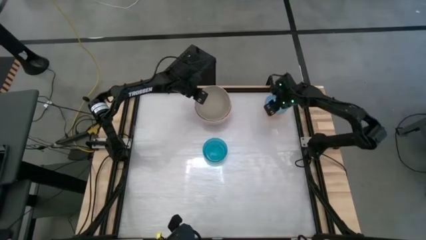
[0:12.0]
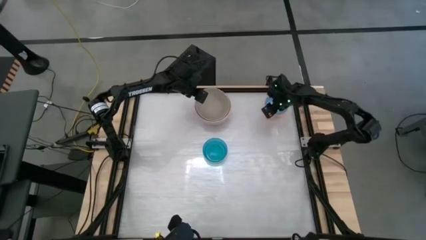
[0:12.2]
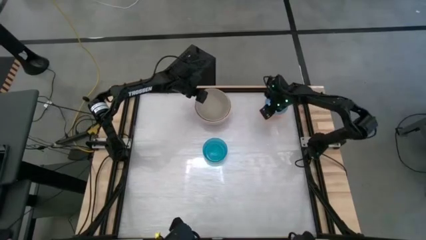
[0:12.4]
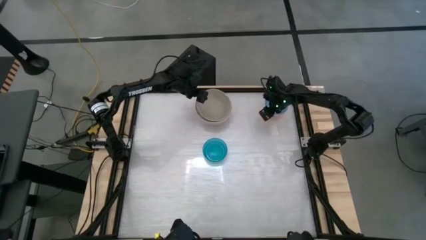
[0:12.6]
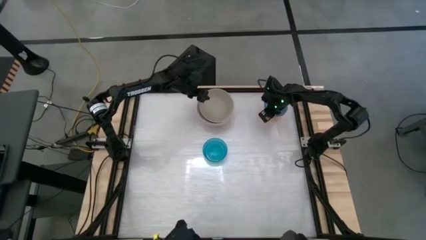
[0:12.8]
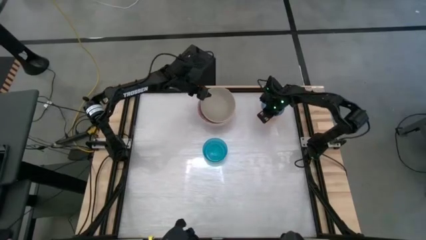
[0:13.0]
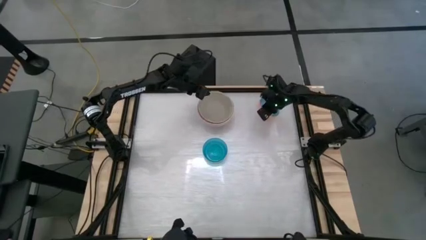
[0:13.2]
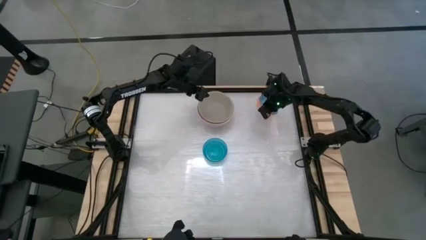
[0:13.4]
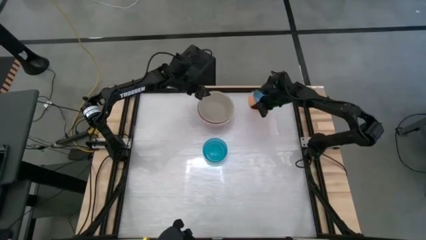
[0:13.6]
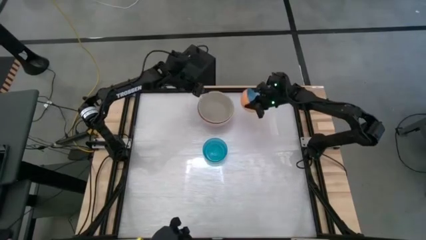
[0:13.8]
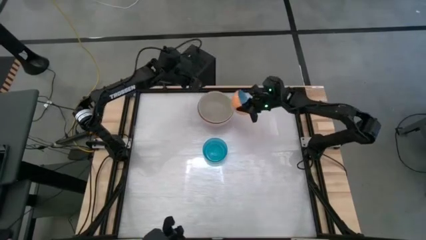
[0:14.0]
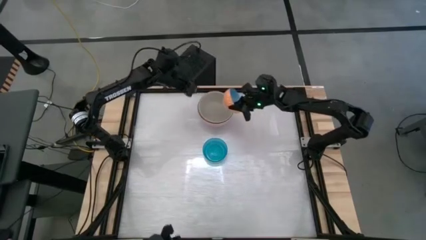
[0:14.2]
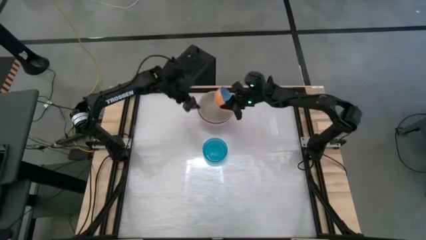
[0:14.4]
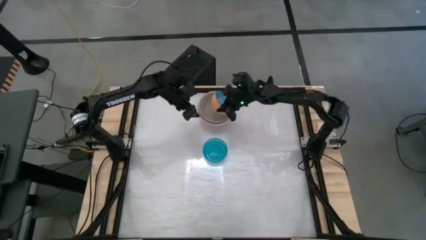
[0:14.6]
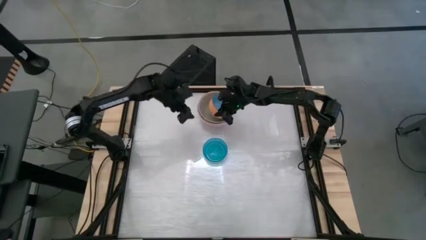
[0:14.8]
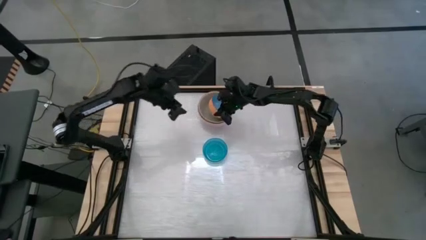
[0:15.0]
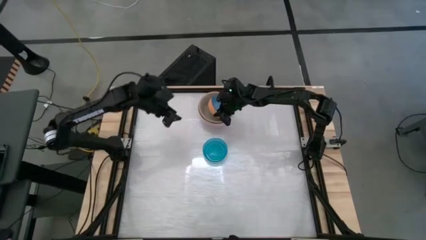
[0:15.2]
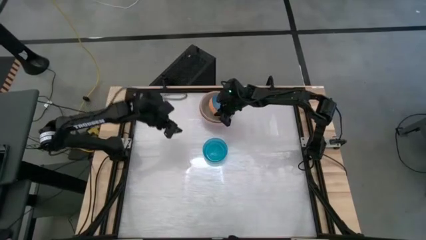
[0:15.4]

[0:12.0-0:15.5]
Stack the blue patterned bowl on top of the beige bowl

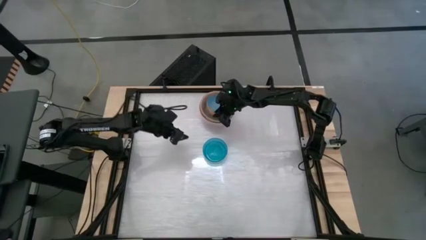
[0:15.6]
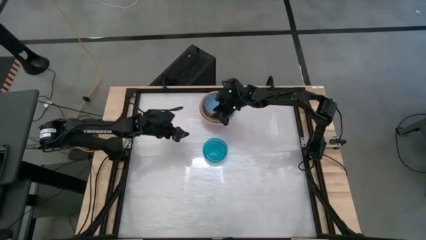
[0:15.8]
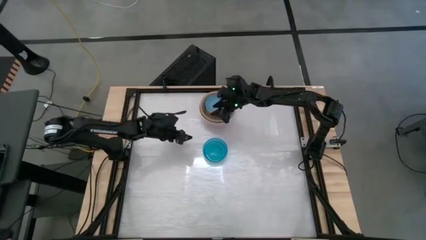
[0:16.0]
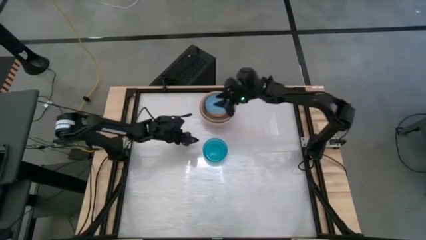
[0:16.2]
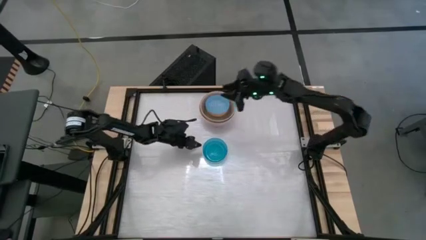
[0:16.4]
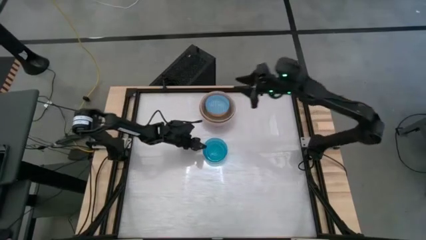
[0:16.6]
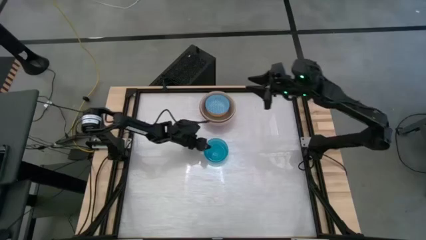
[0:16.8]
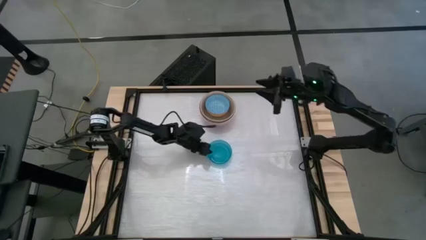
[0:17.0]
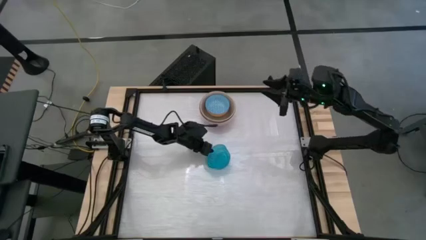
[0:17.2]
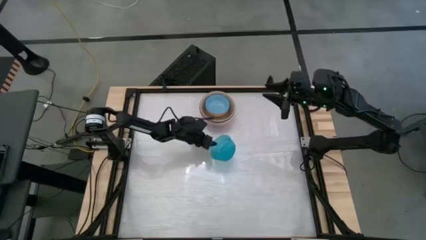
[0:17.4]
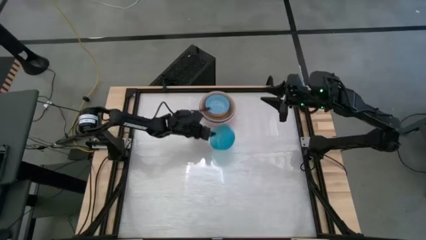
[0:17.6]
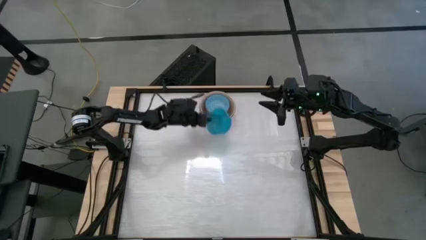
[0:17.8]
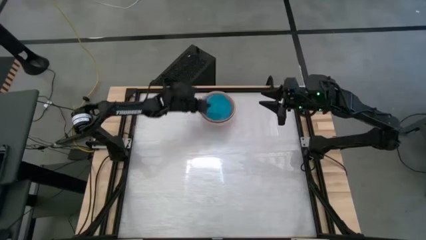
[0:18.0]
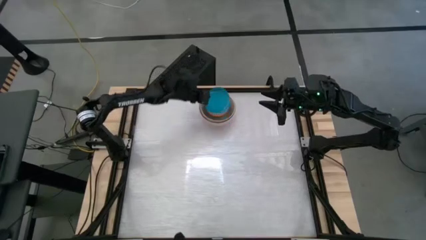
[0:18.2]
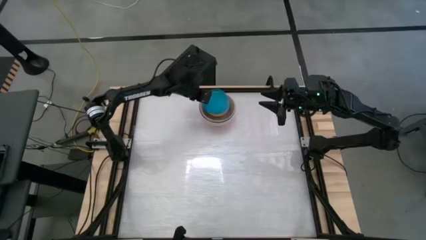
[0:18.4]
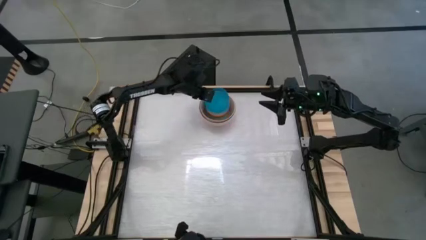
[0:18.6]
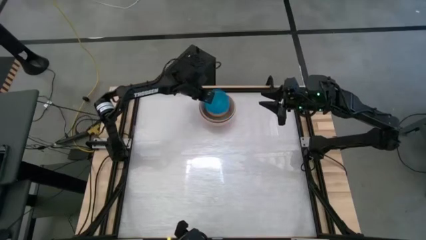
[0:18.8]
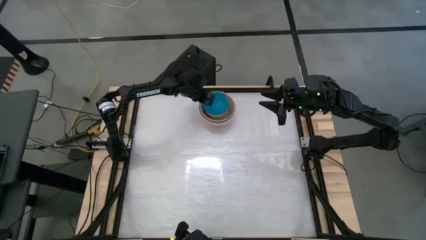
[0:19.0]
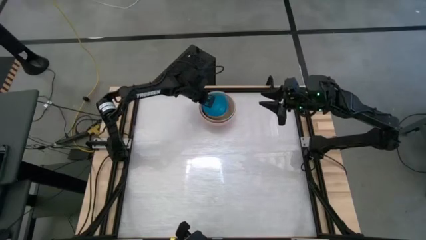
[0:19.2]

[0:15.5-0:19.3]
Stack the blue bowl on top of the blue patterned bowl

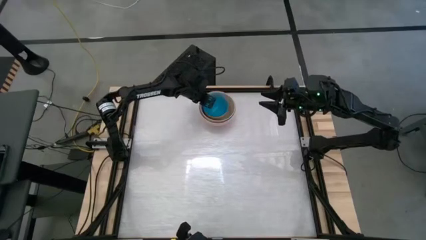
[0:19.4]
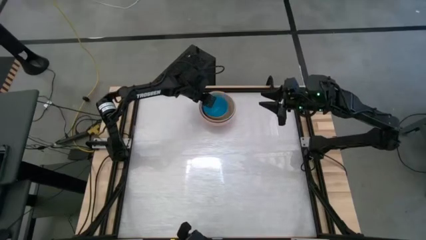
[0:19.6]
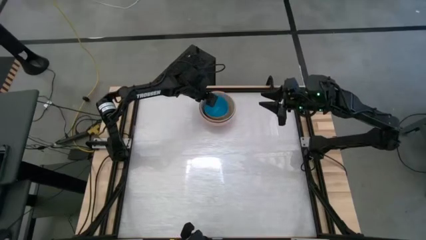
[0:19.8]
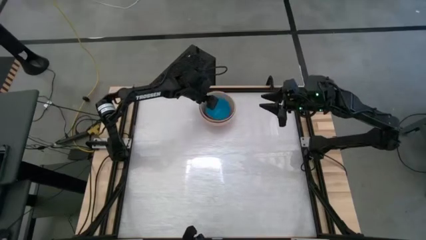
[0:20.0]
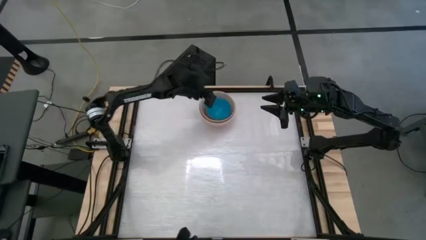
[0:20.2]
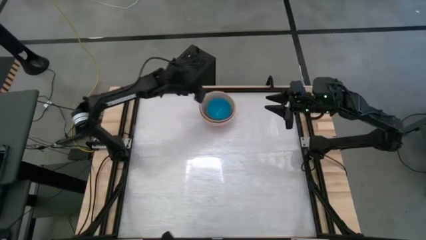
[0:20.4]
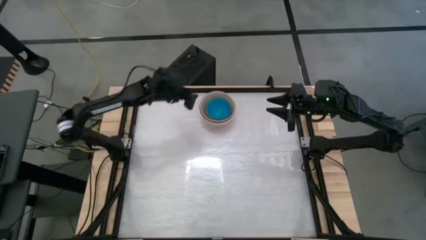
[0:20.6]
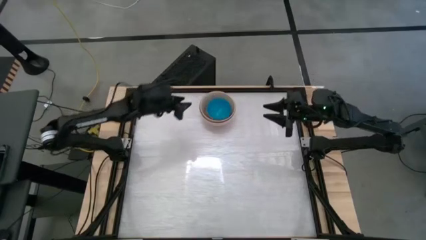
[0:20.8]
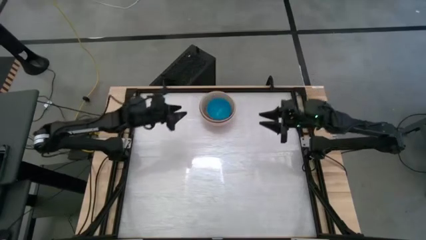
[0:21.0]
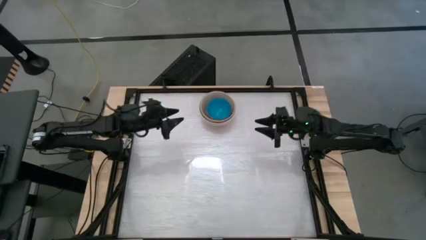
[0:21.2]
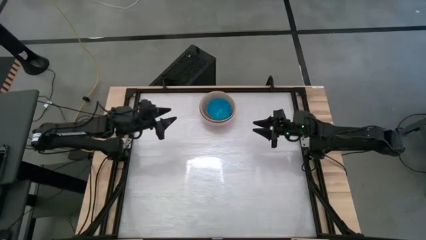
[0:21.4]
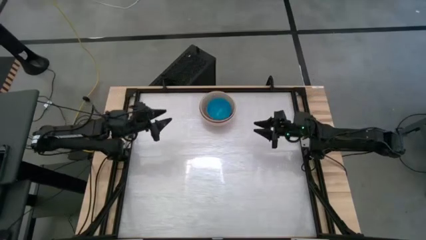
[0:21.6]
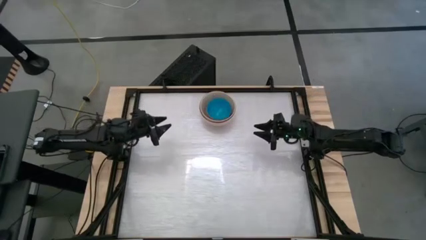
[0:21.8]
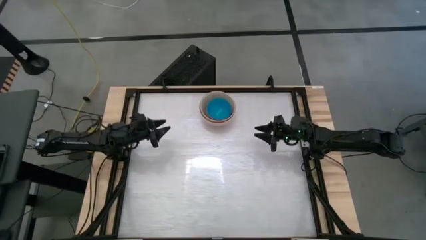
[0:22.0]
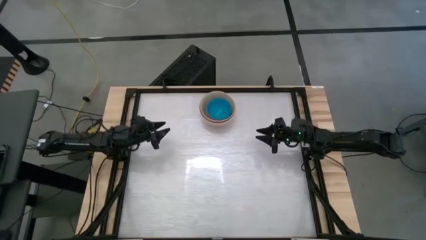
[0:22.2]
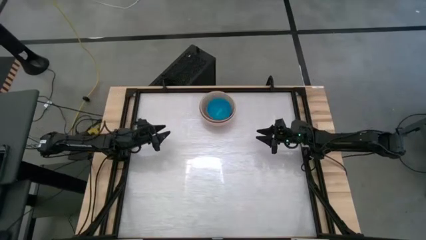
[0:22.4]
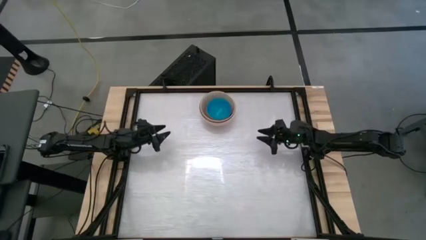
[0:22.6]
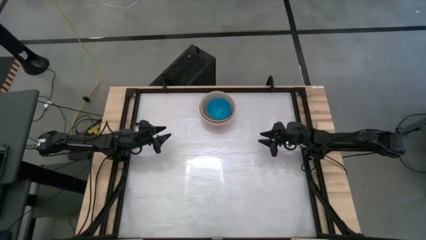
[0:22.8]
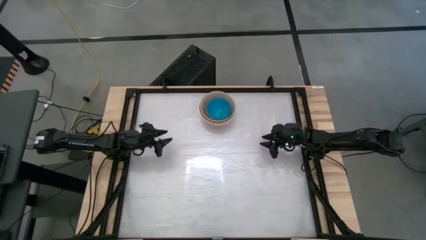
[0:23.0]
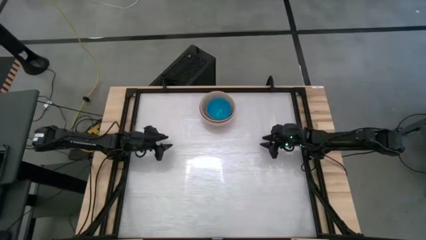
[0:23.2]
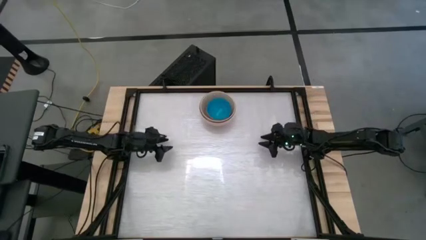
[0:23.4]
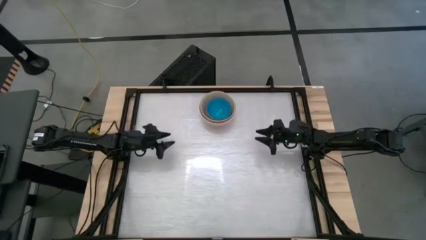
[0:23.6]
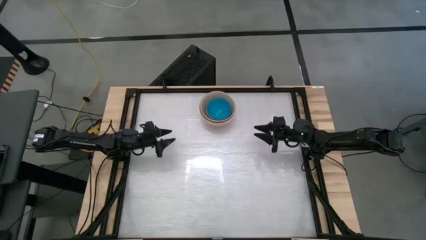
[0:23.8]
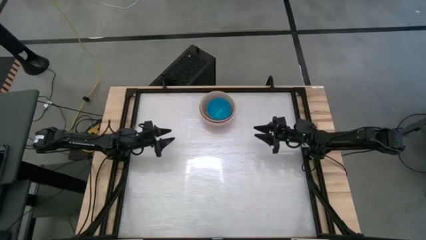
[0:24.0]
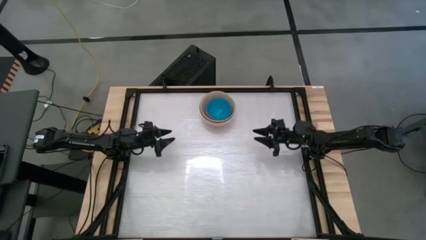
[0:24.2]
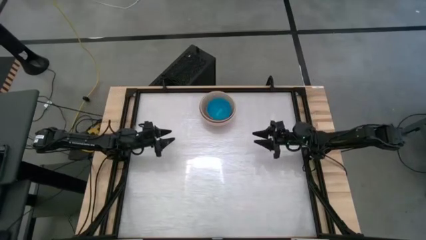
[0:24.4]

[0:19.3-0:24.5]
Return to Home Position

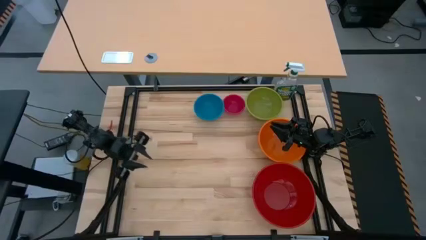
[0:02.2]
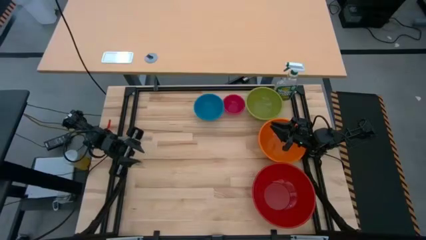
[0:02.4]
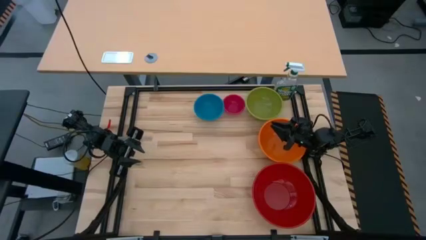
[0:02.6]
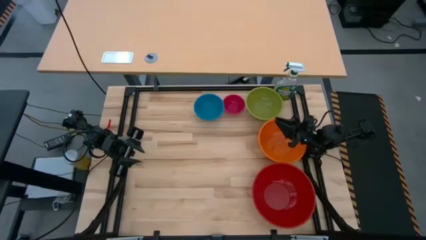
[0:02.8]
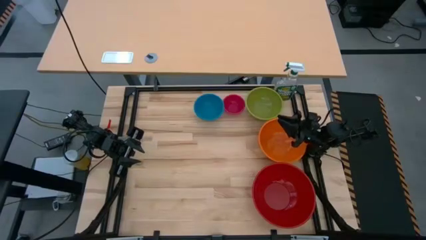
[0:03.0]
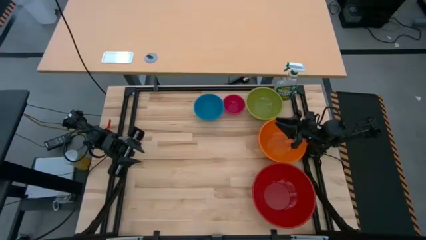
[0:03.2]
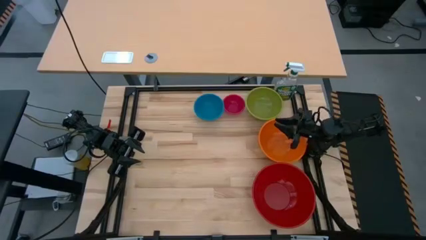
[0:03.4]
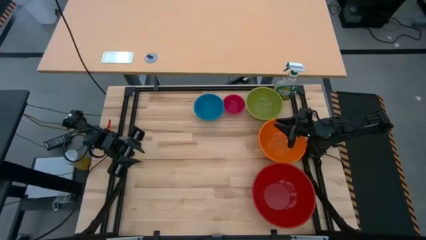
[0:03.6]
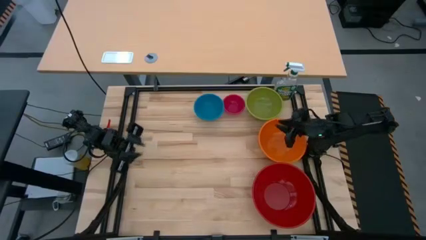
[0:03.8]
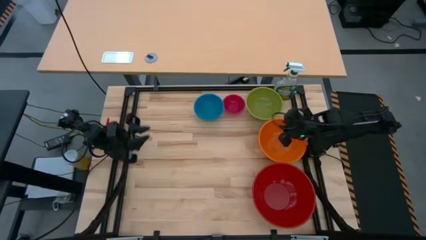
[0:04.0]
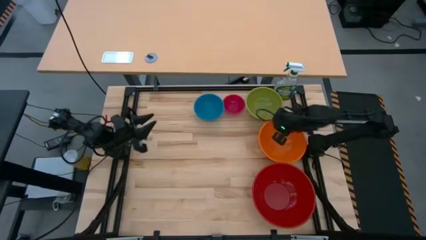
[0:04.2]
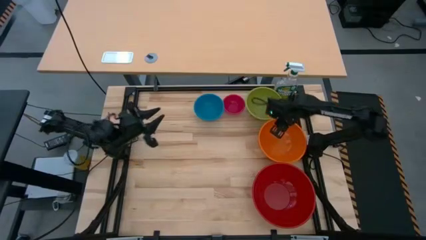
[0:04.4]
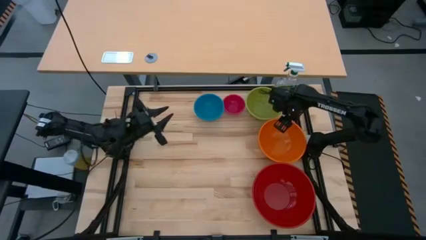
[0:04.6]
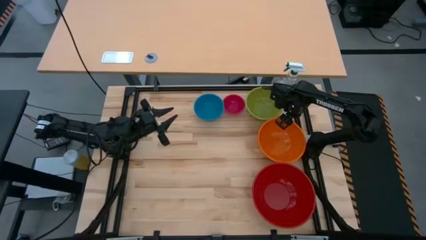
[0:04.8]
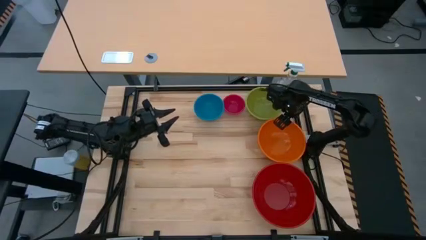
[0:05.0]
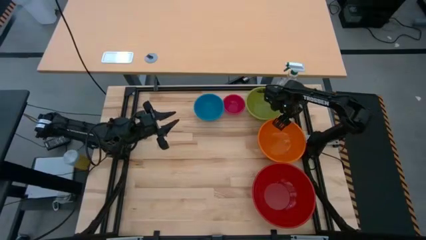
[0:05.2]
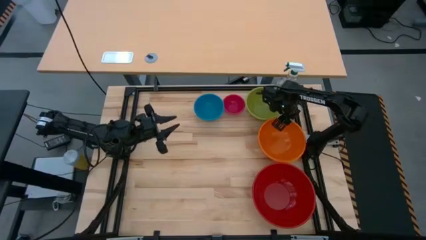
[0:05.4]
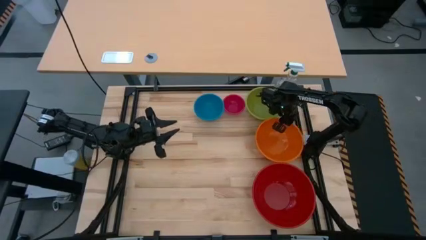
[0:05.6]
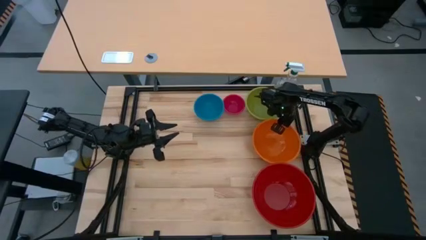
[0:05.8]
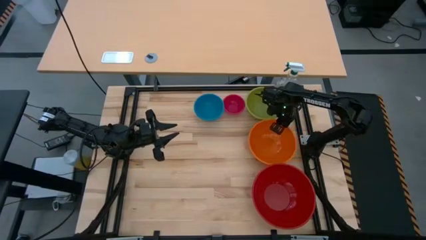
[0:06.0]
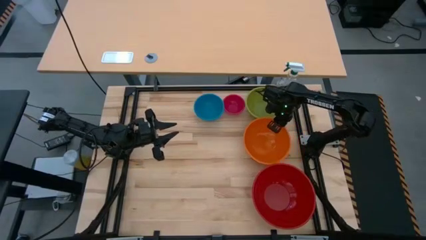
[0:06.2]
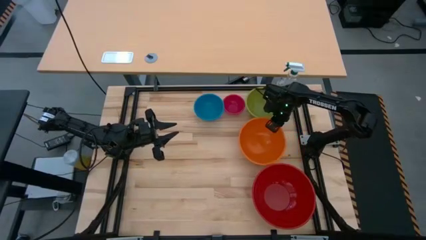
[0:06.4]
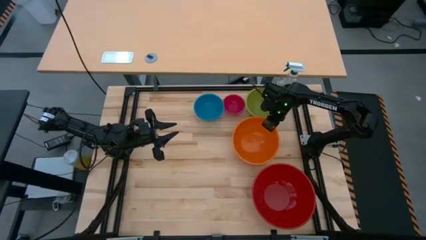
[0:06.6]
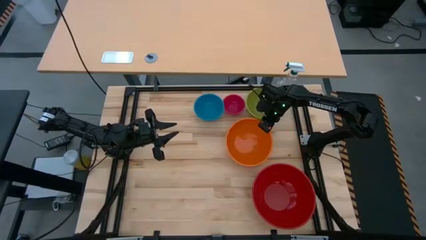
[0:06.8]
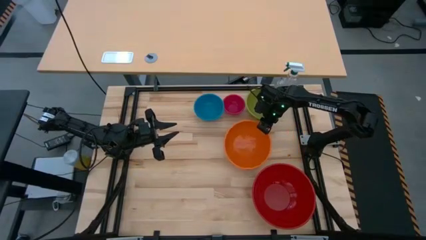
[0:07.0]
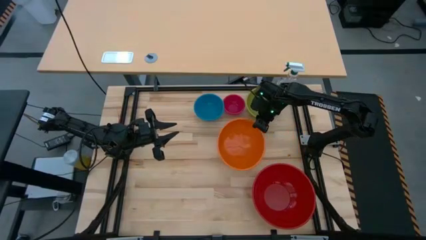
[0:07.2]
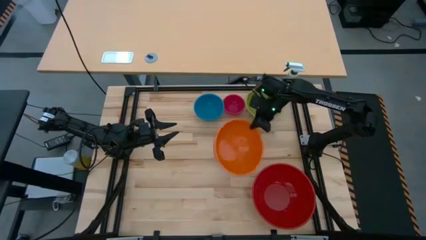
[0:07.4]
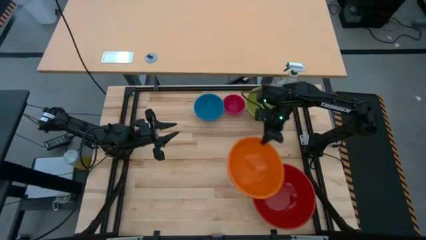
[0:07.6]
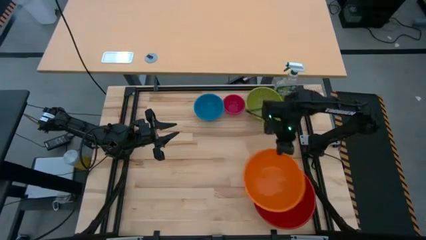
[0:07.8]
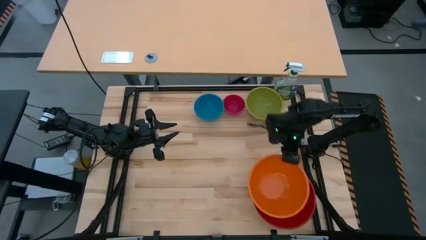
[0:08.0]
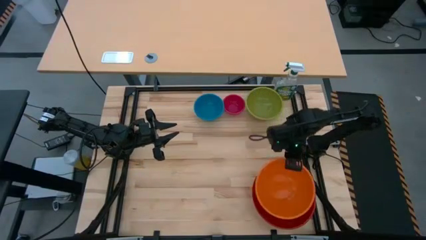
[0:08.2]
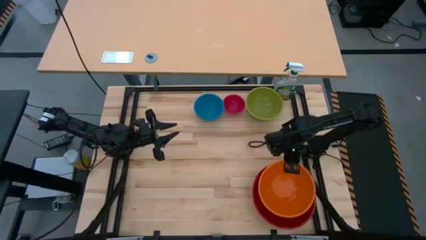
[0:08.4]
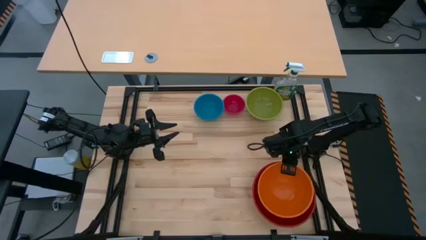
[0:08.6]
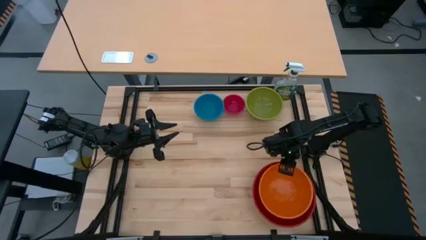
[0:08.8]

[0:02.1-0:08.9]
Stack the orange bowl on top of the red bowl
